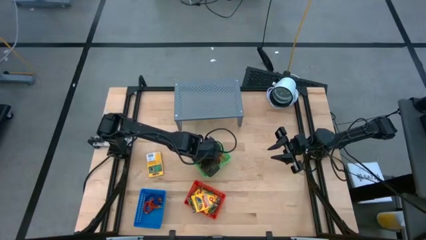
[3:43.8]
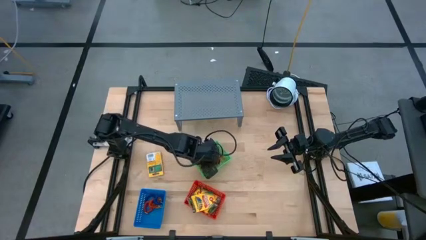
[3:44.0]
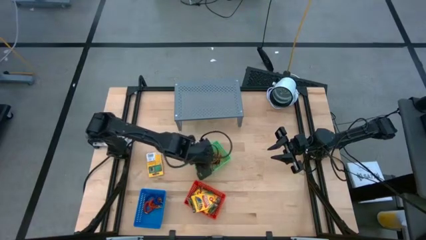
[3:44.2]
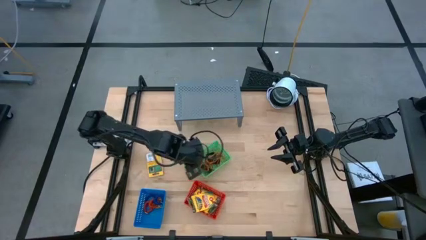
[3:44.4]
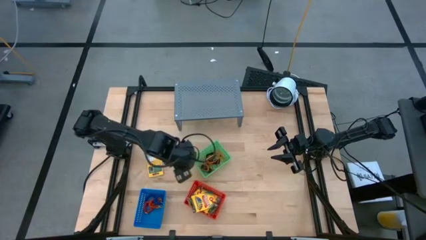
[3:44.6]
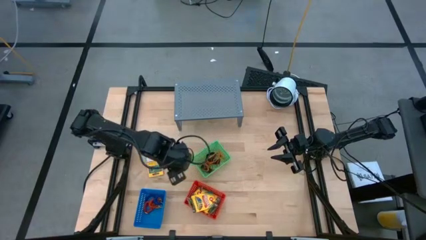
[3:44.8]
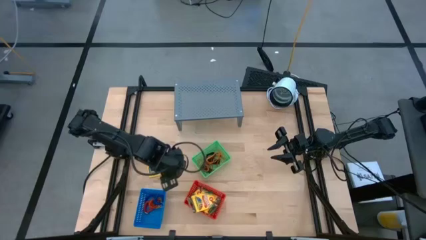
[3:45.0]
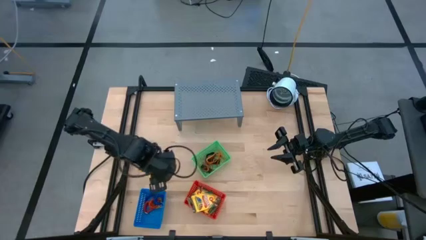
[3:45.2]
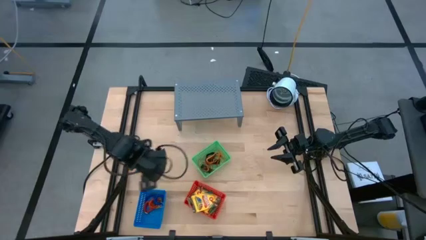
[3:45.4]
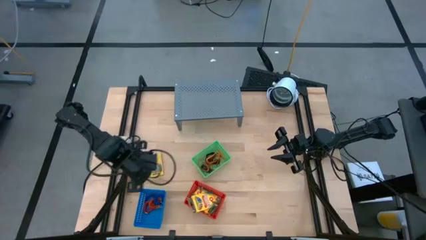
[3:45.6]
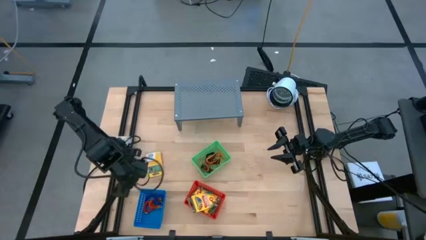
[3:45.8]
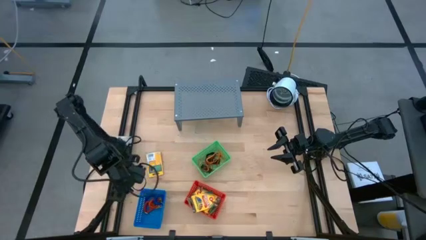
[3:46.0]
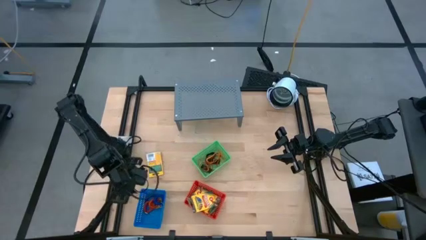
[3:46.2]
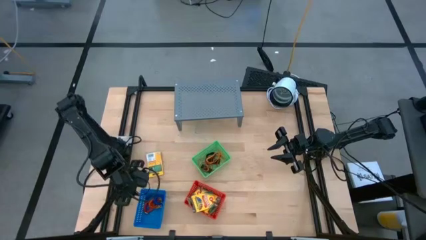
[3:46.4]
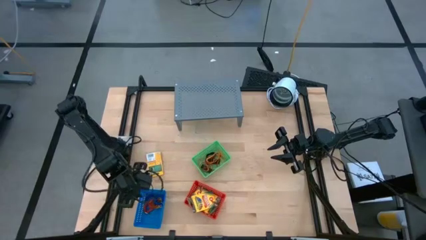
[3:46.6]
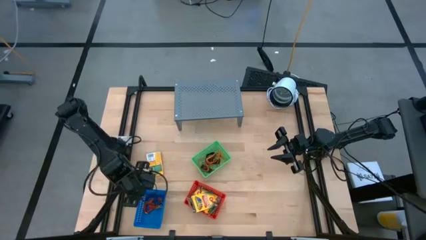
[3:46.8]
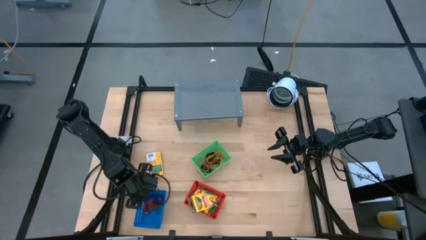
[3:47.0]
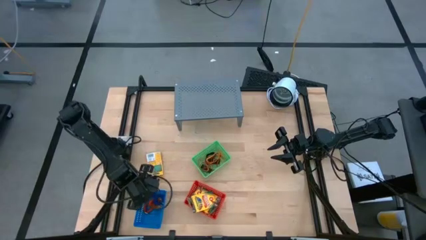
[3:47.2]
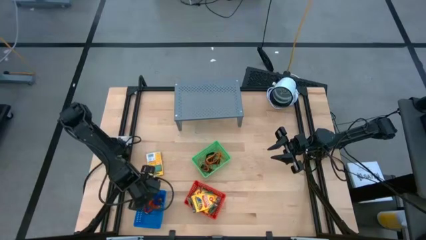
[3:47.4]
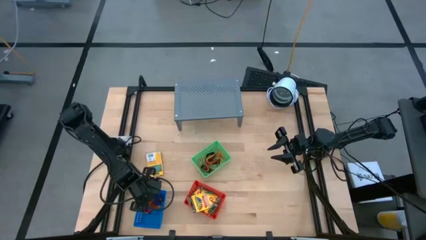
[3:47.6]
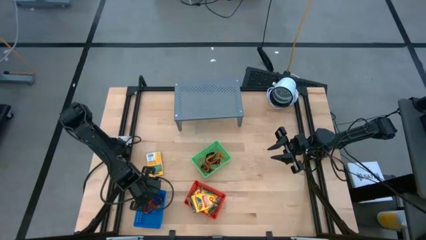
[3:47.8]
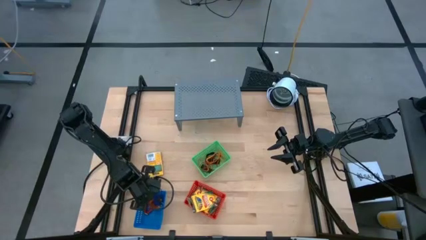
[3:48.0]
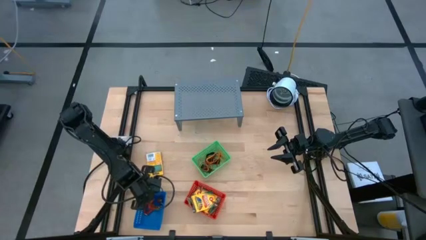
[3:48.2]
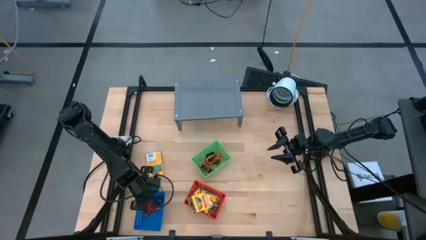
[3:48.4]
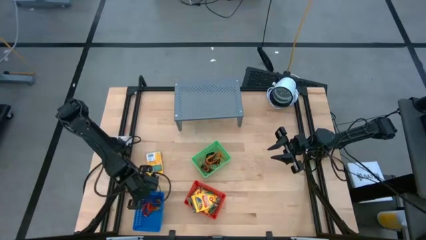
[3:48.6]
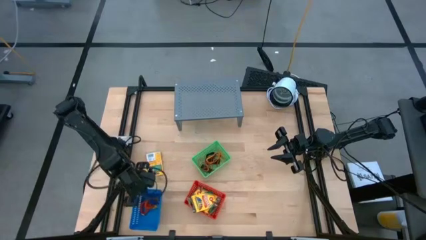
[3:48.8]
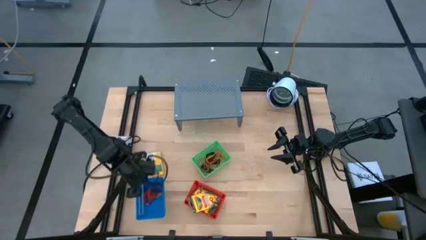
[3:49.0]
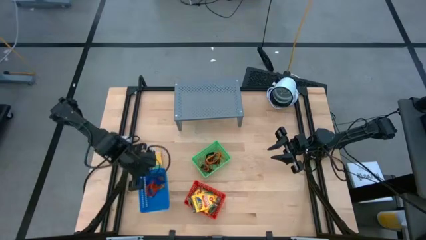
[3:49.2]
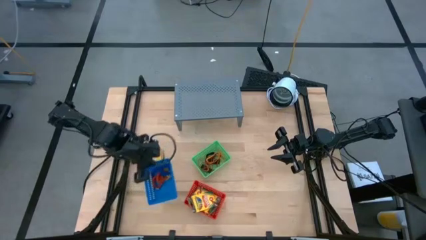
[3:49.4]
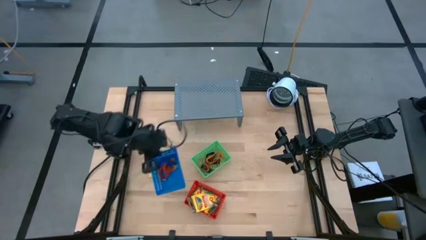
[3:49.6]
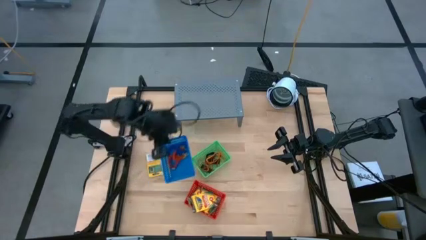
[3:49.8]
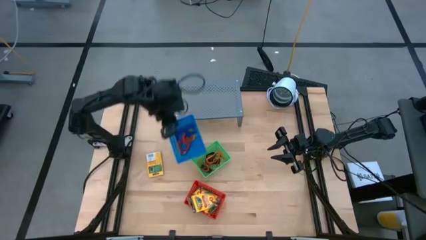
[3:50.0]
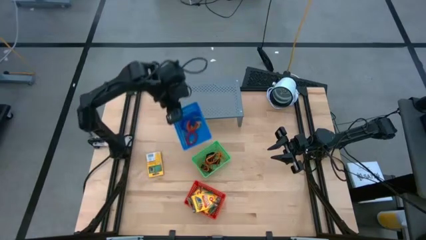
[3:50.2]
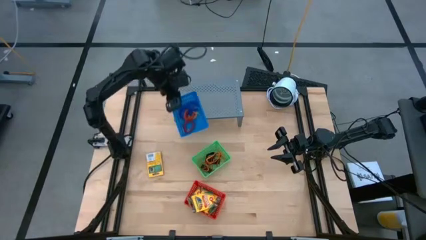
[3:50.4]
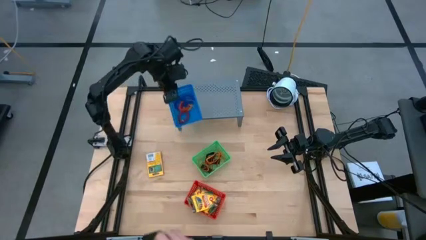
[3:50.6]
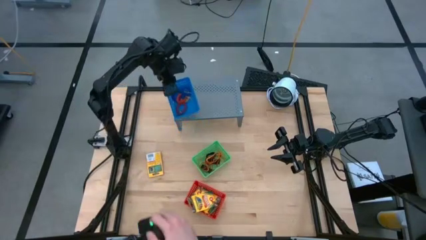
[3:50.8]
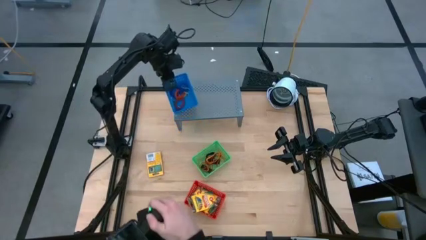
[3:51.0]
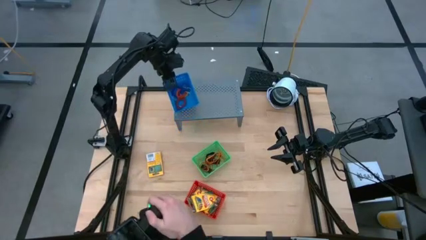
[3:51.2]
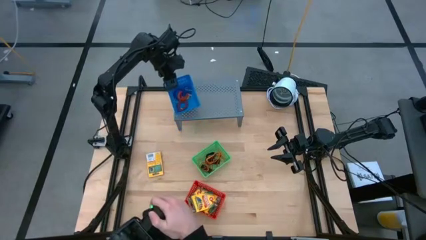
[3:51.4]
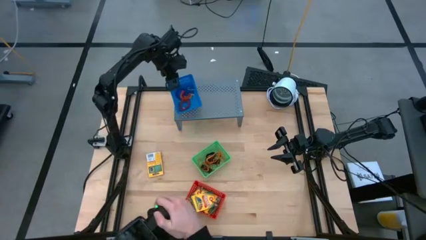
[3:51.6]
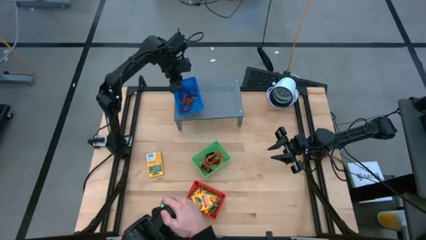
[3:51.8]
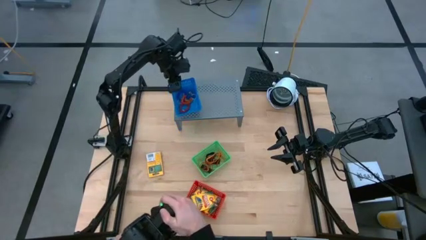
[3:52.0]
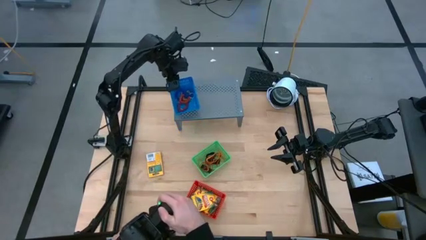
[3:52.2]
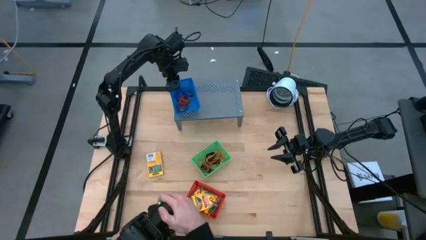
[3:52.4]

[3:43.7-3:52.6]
Task: Pick & Place Office Desk Supplies
Put the blue basket on the shelf
